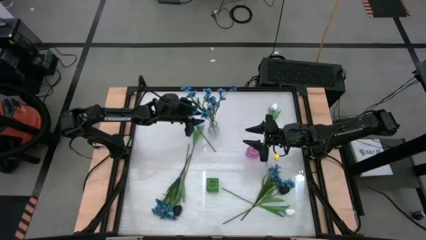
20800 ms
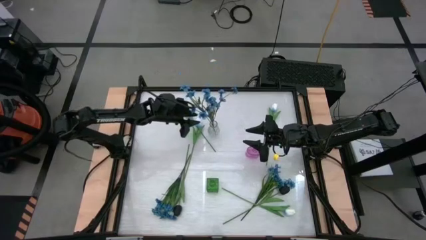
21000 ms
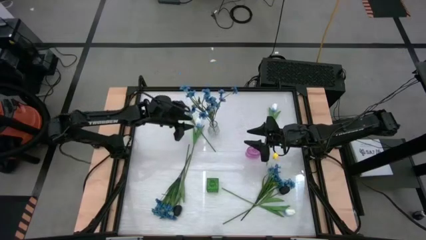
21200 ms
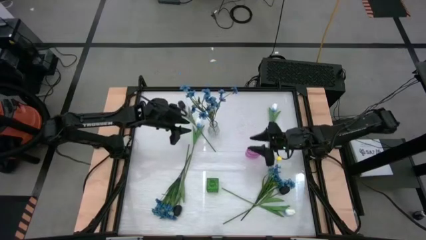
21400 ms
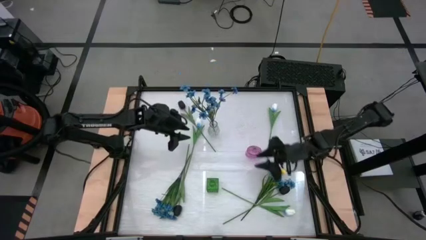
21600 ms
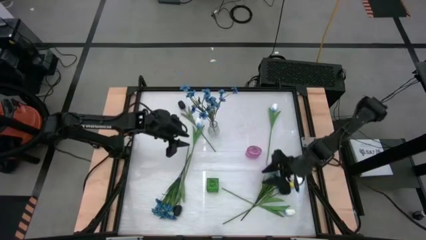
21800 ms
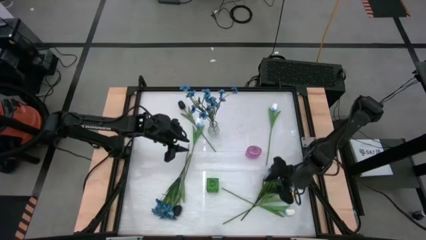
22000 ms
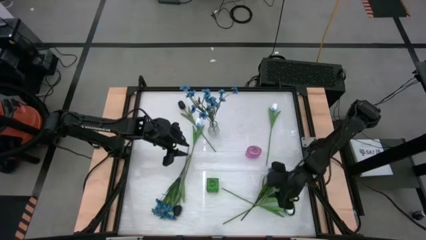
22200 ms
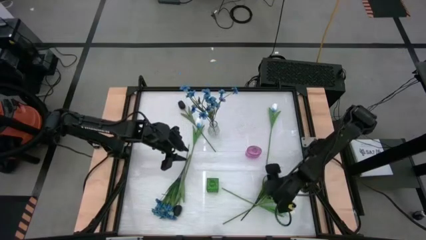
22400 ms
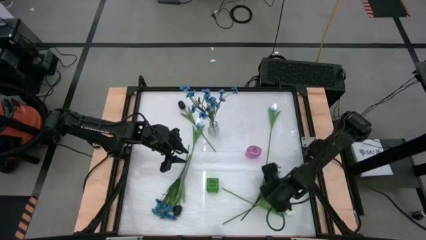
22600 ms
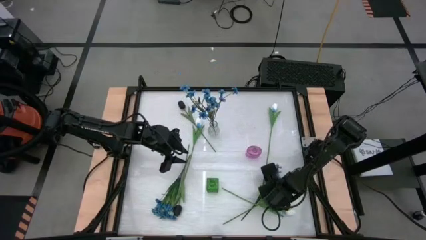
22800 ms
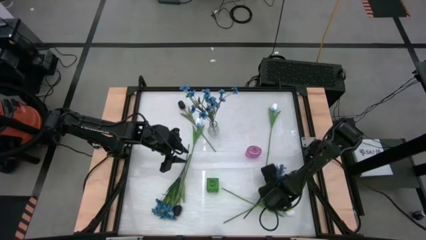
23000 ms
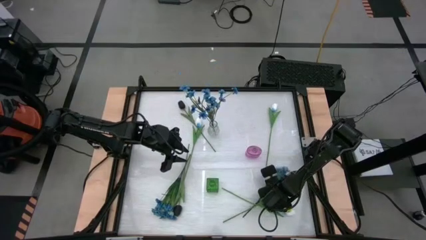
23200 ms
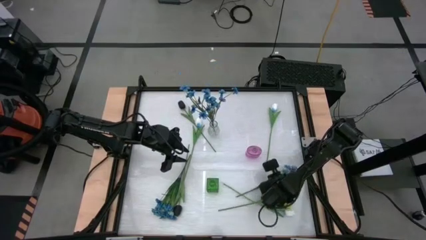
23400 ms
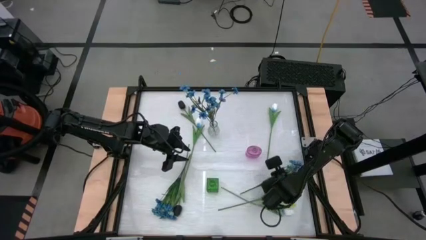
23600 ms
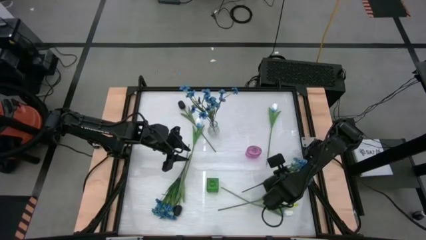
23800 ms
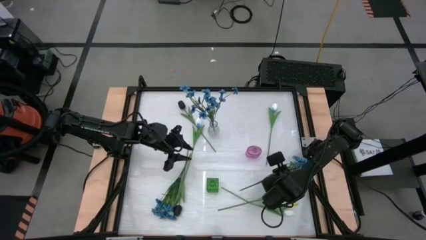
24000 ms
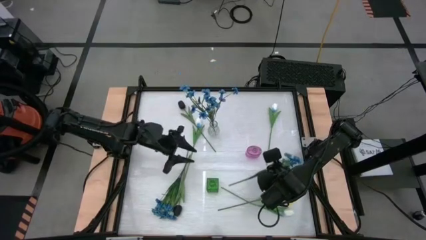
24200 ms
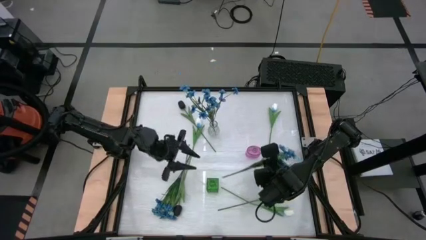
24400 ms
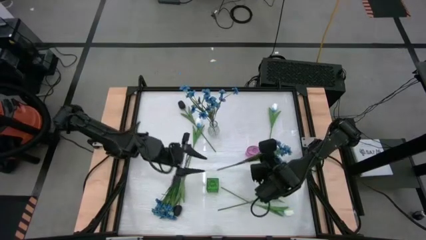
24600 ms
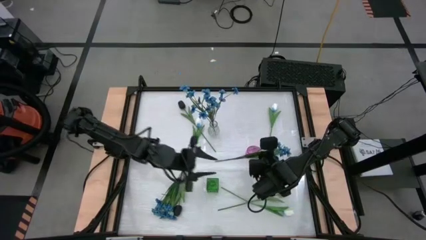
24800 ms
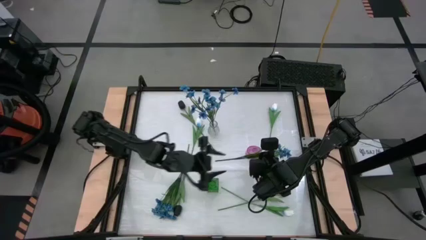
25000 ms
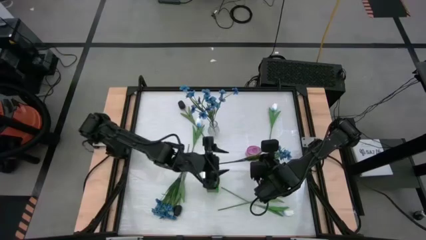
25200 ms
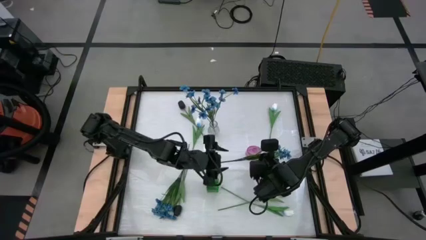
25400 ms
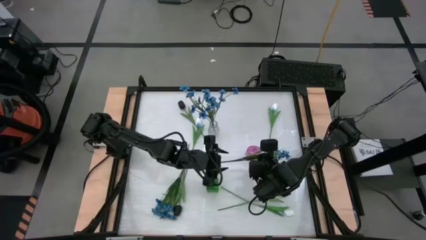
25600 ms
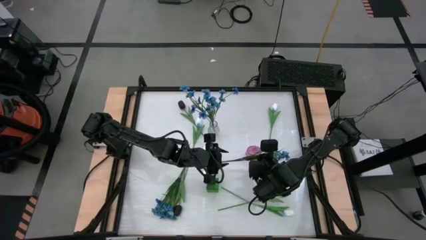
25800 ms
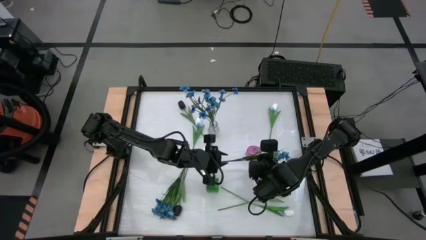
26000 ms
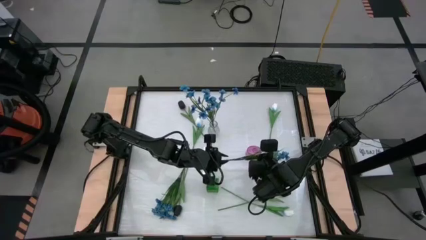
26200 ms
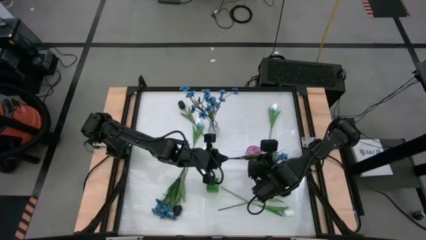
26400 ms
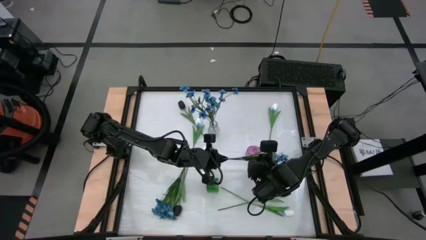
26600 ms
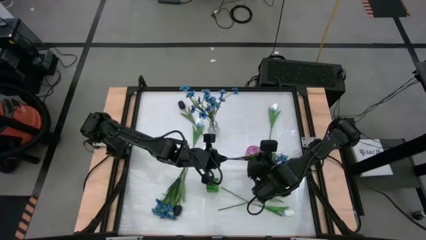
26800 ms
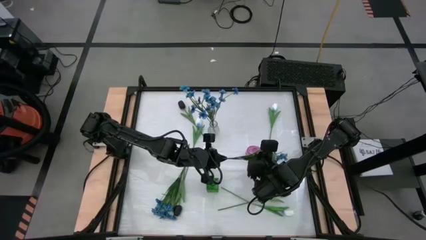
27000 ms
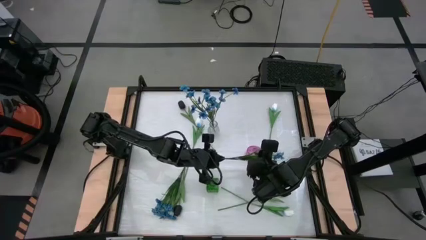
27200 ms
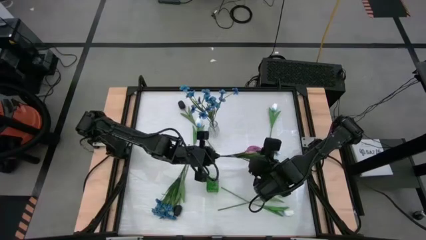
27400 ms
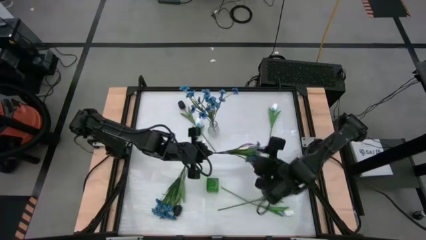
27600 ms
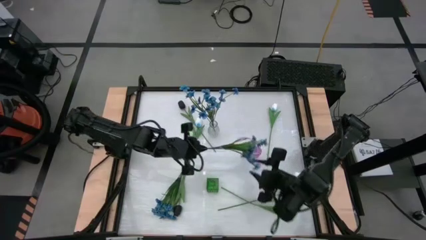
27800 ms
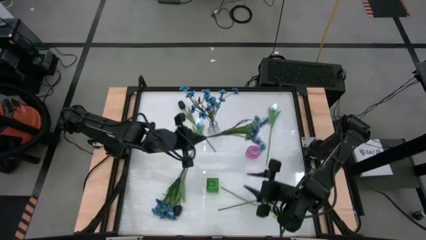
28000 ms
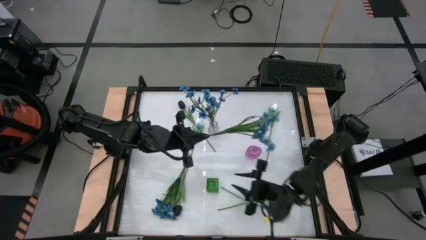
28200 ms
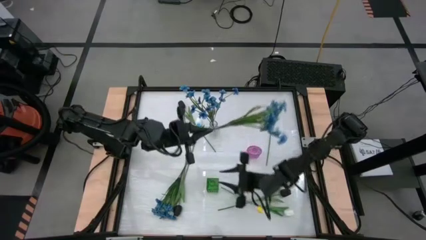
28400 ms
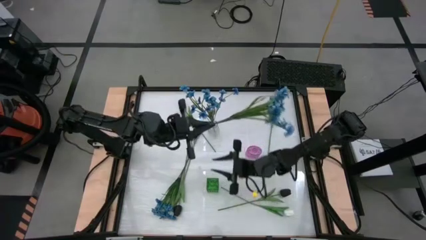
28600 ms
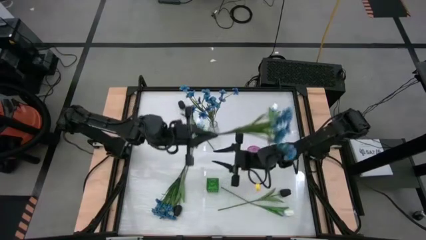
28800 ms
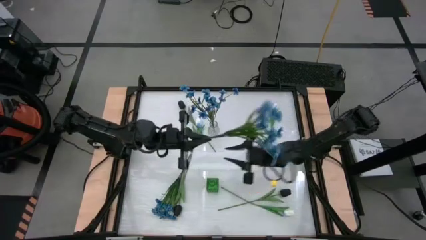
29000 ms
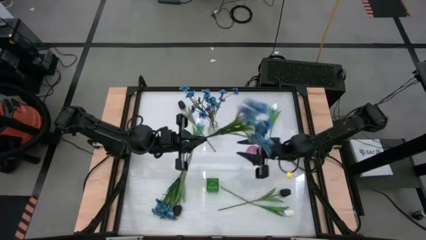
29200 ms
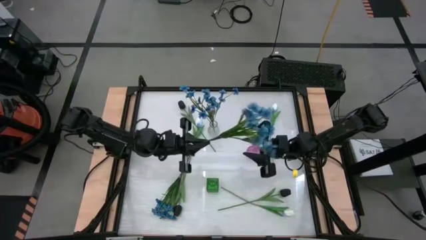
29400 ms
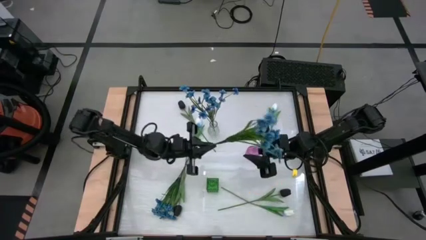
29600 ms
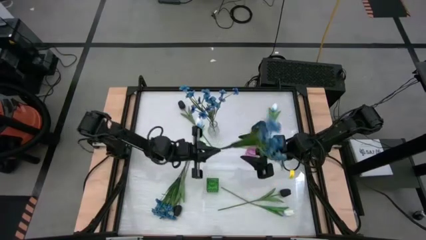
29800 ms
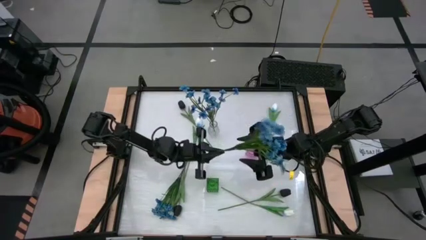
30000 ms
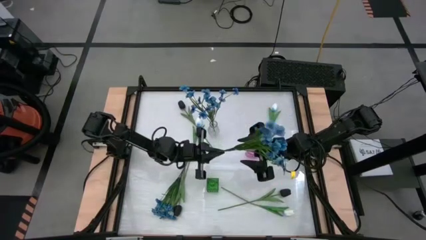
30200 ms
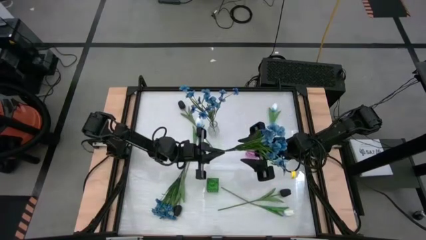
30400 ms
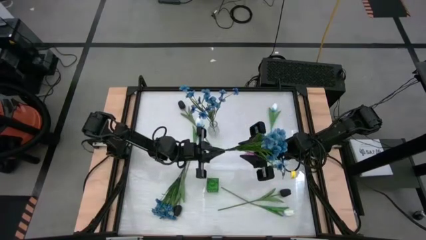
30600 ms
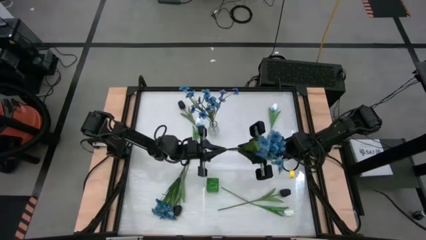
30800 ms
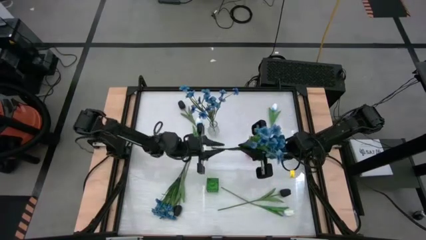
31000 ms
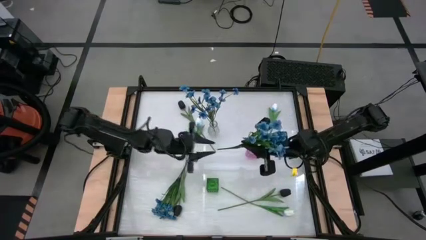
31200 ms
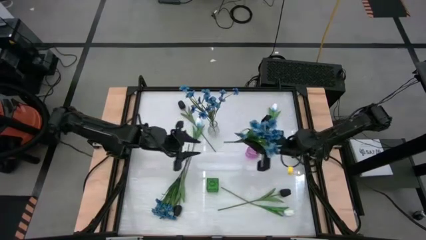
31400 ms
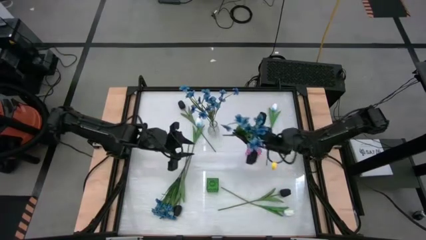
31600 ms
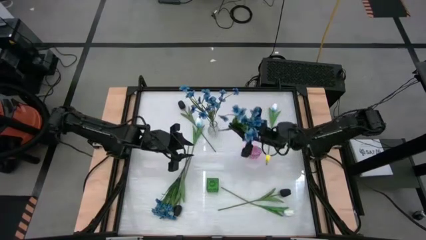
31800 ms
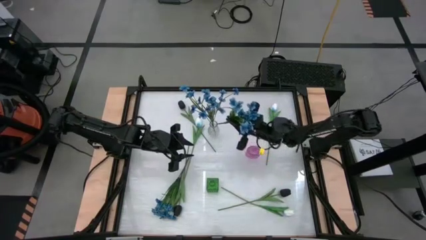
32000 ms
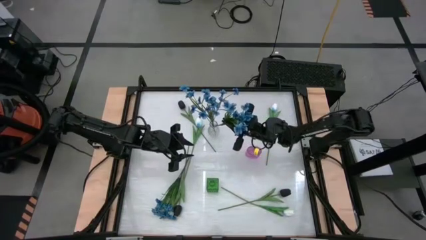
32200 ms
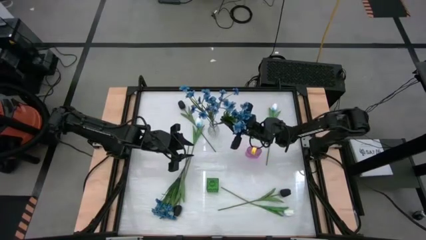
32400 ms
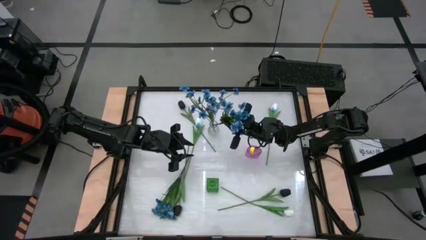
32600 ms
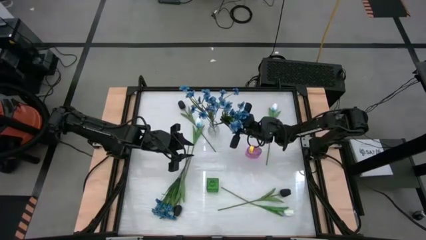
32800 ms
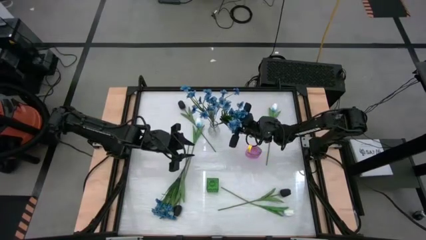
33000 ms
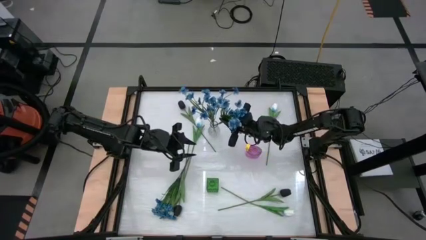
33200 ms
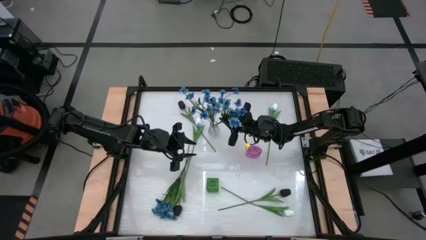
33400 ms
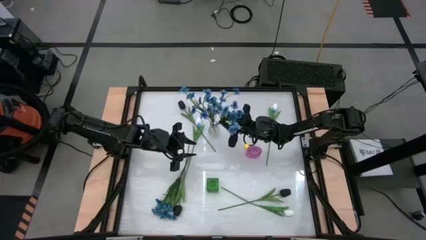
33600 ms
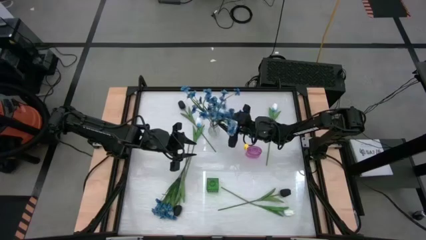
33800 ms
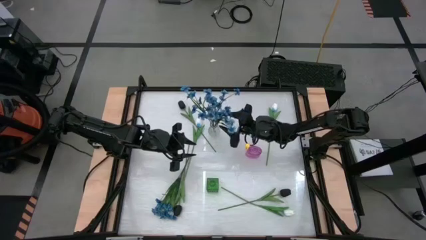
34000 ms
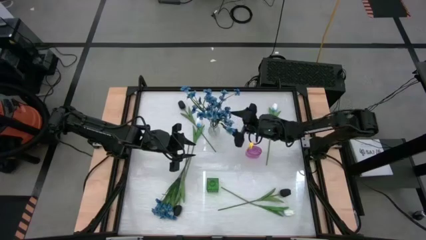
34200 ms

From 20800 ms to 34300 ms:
Task: Sort flowers into vase by color
Put the right blue flowers into the transparent vase

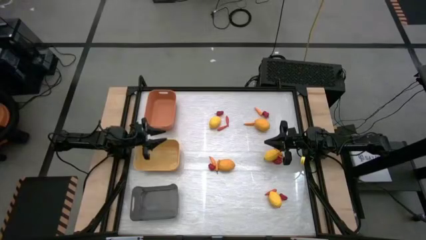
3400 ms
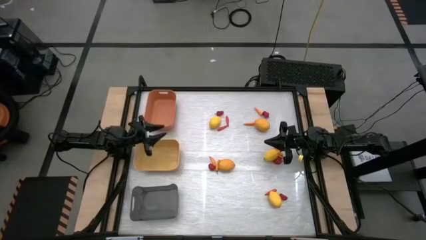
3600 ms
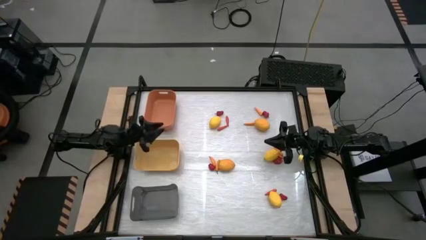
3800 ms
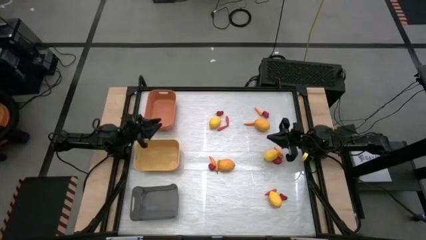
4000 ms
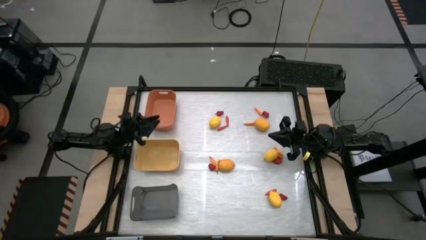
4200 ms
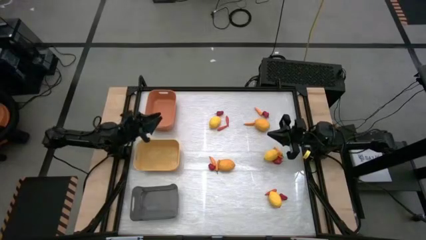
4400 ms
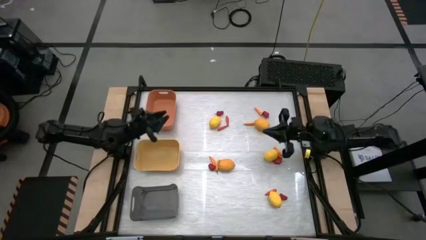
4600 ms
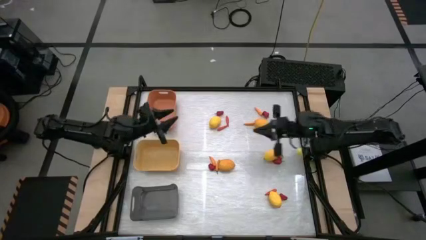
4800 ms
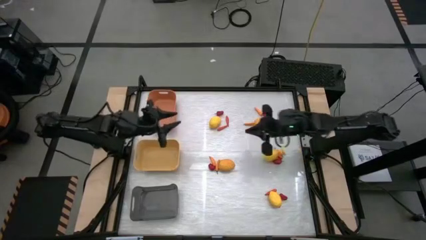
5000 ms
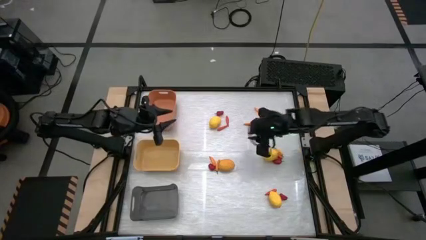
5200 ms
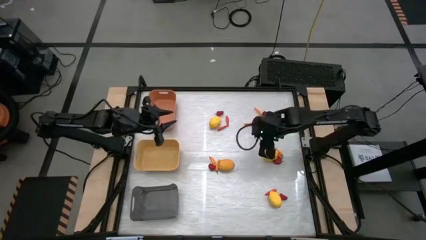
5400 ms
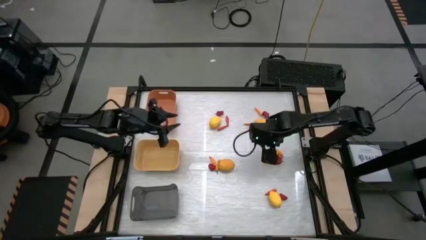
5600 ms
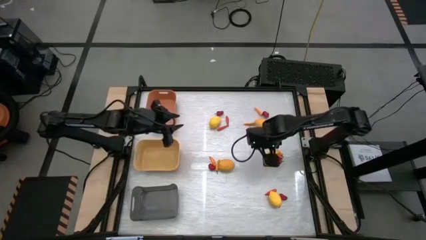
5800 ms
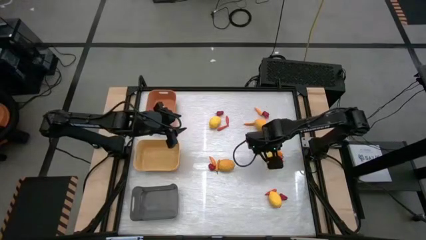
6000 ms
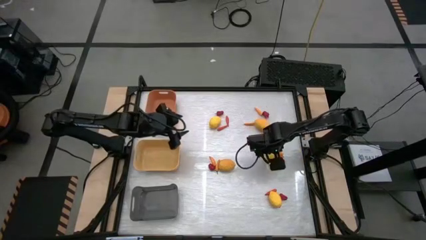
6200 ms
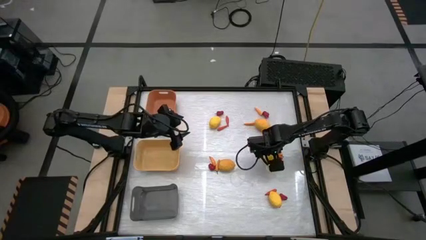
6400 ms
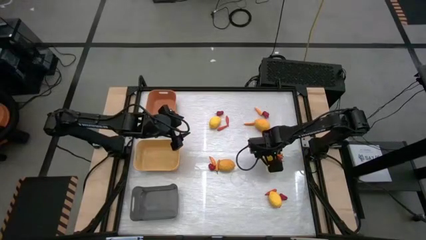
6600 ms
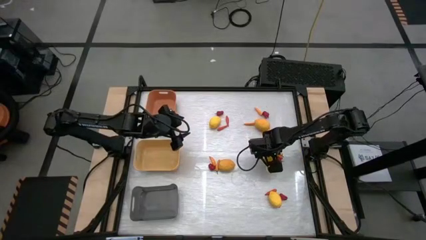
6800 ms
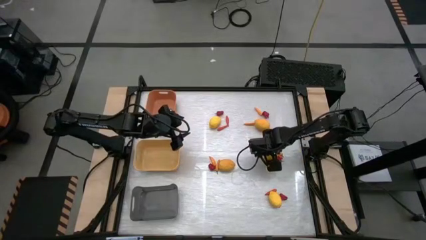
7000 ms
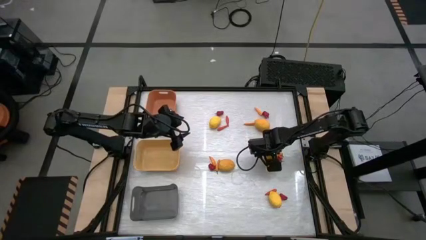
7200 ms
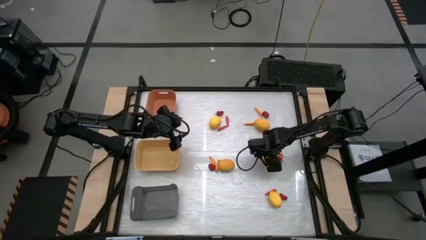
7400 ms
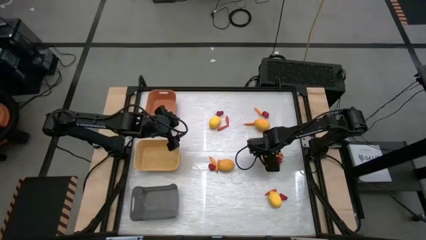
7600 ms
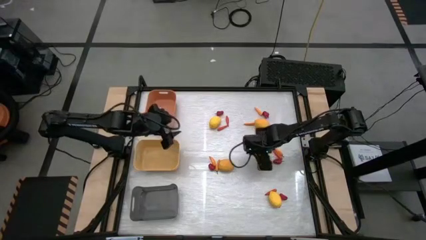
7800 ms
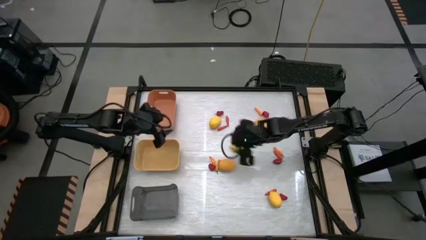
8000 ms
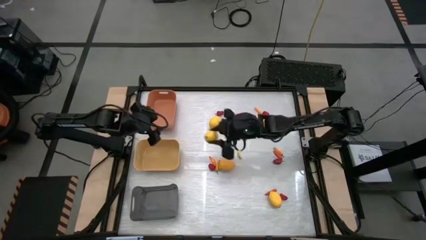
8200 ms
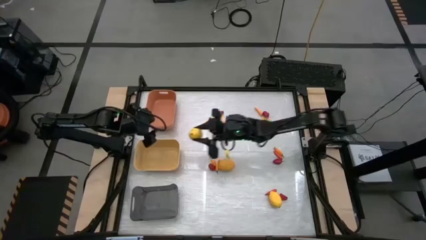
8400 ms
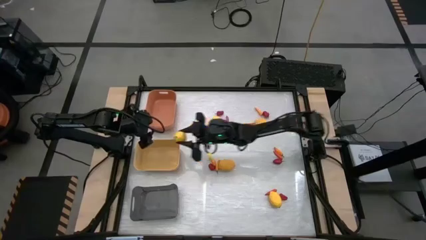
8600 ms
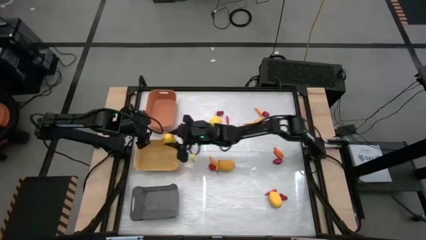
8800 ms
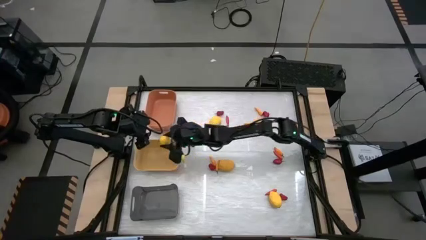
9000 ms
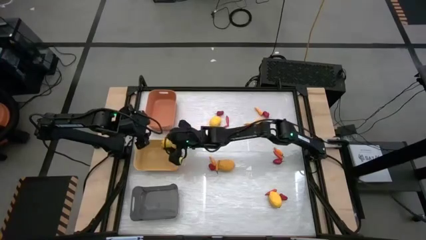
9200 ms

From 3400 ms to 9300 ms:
Task: Sort produce into baskets
Put the yellow lemon into the yellow bin
